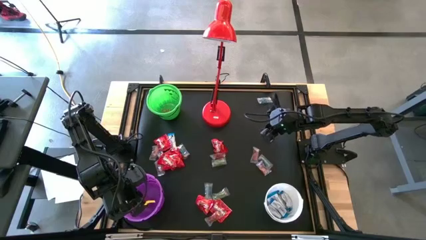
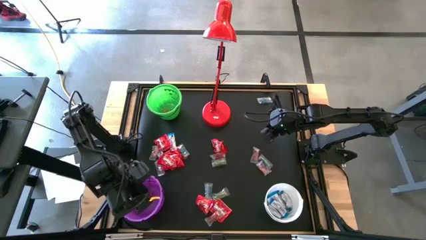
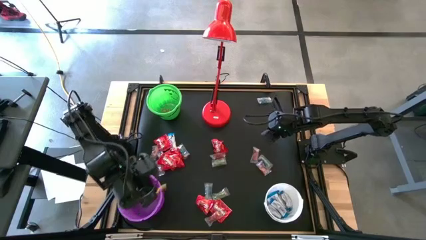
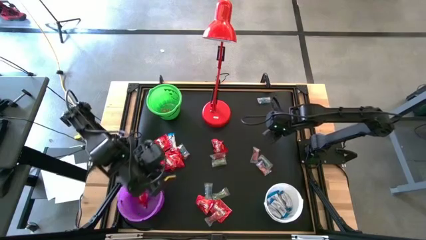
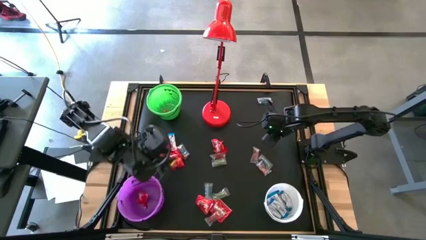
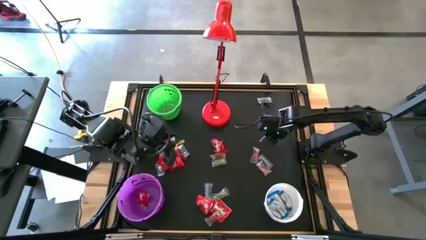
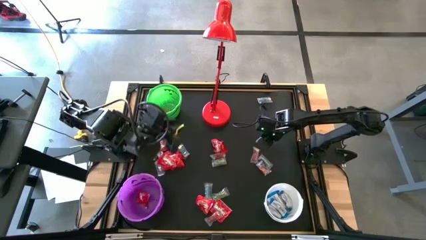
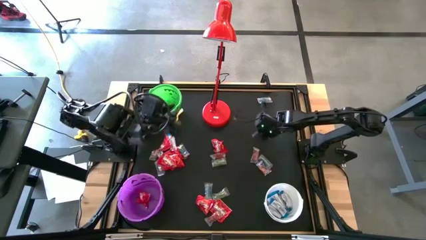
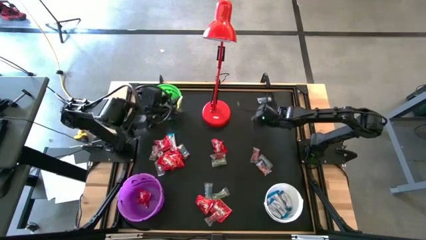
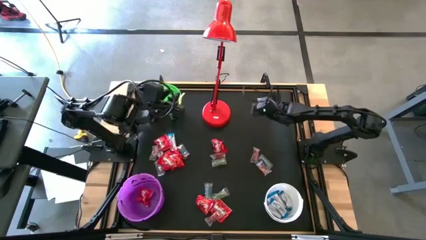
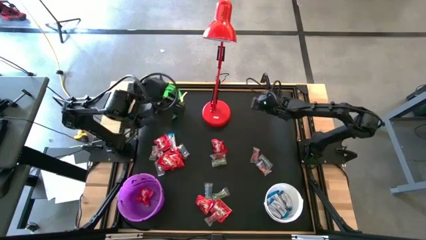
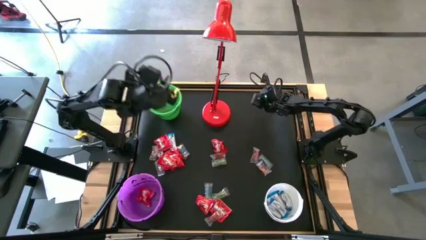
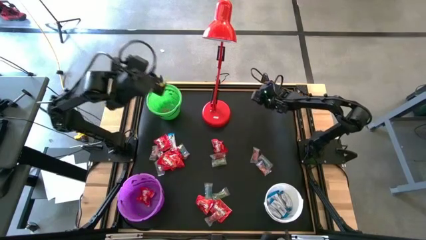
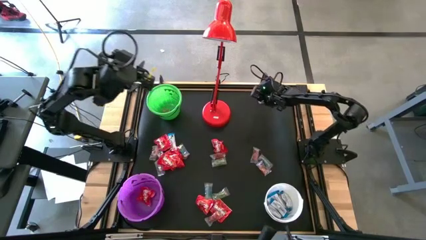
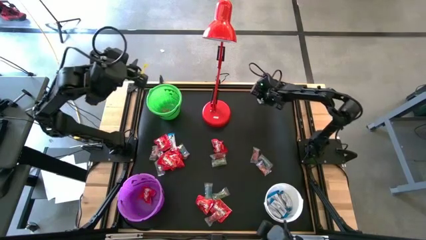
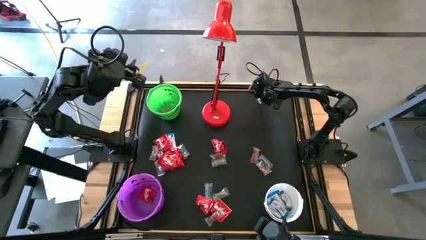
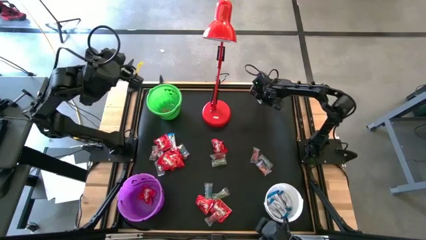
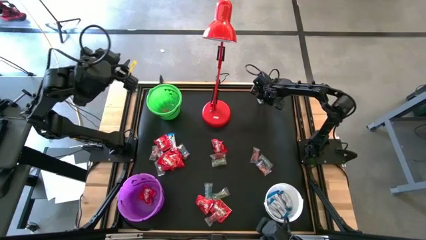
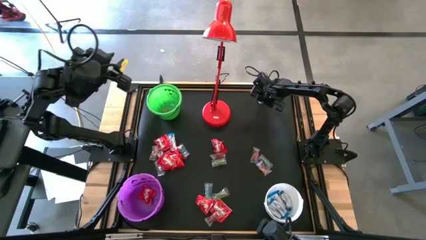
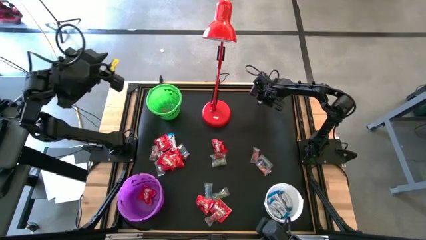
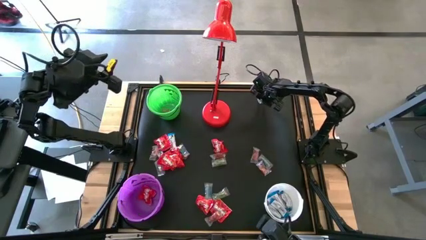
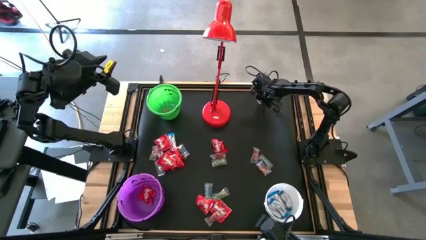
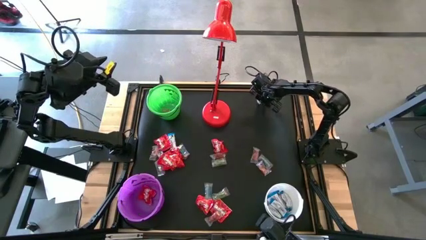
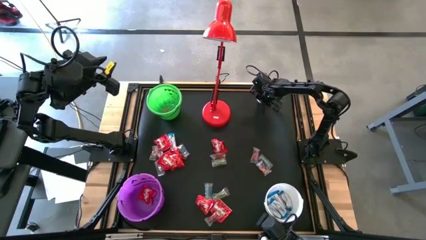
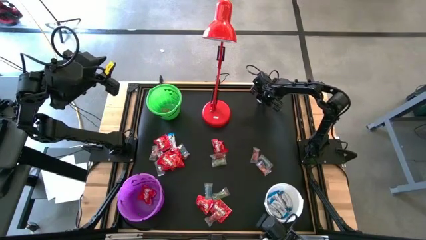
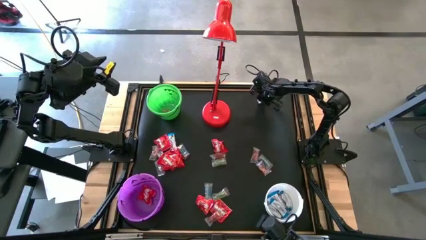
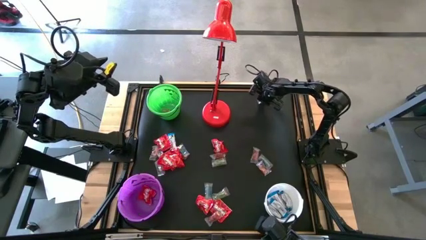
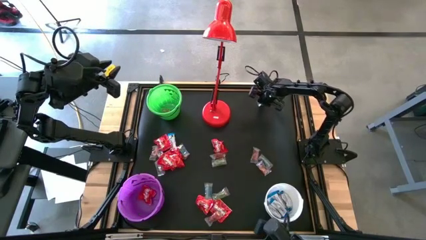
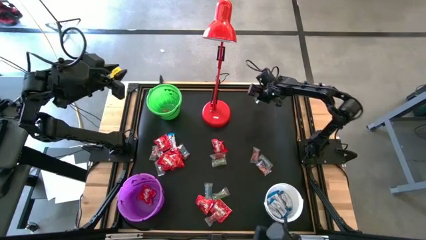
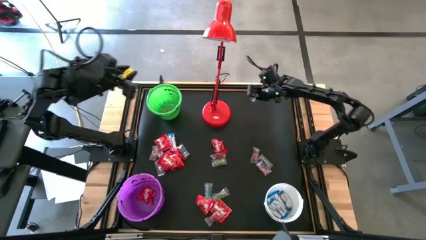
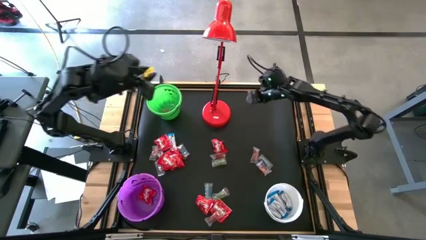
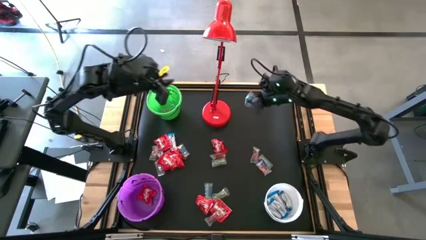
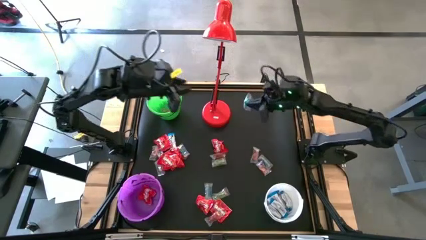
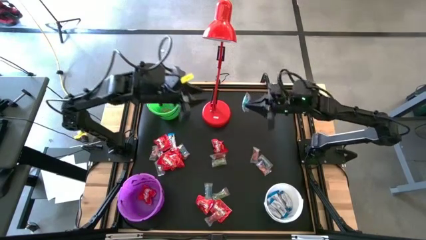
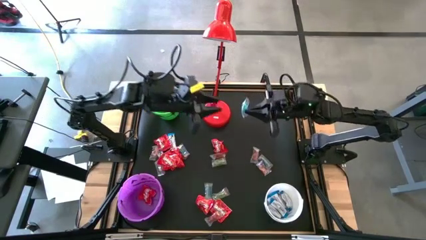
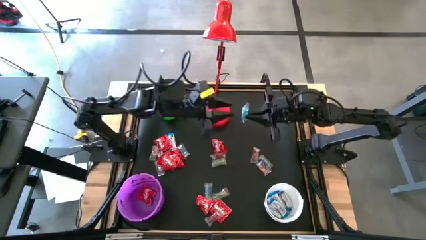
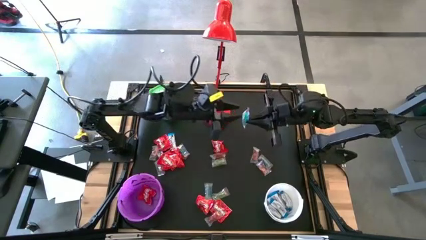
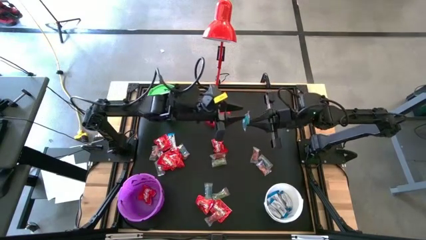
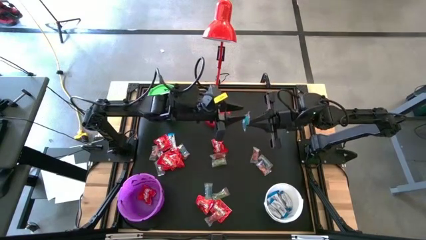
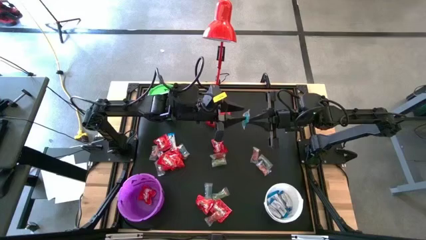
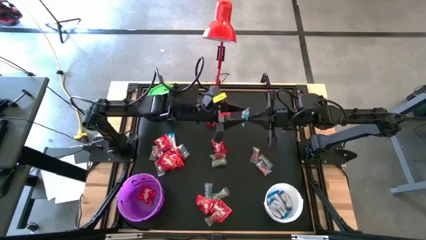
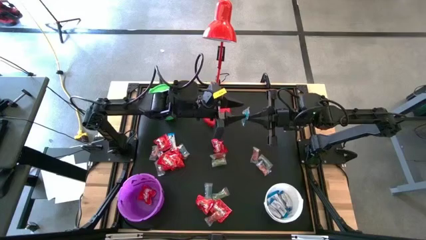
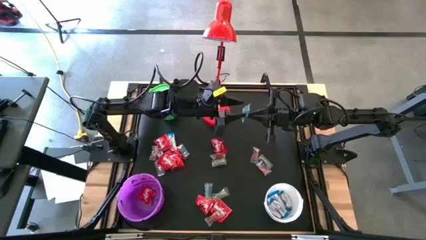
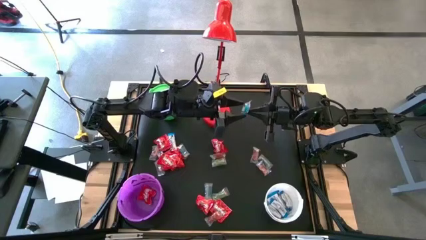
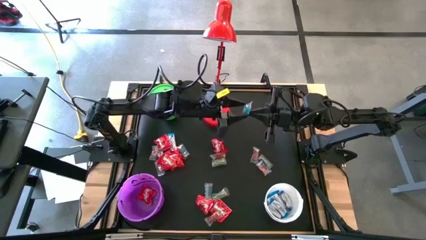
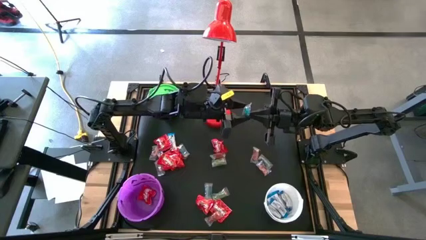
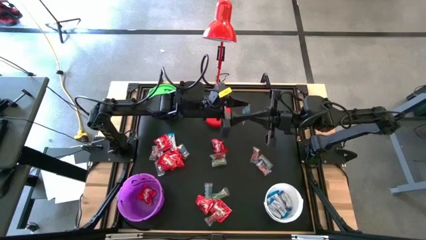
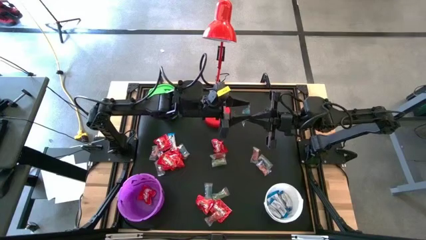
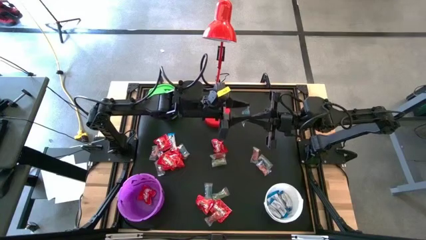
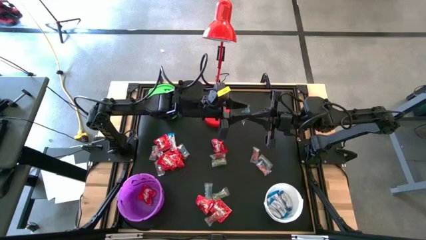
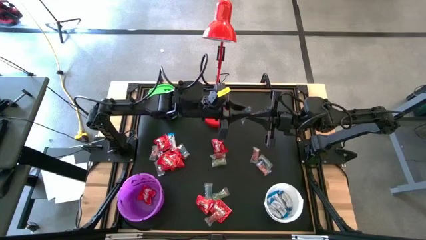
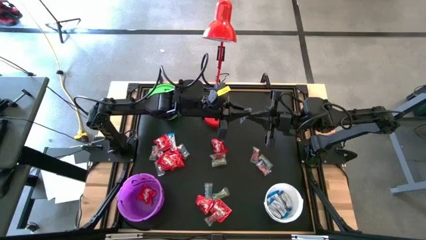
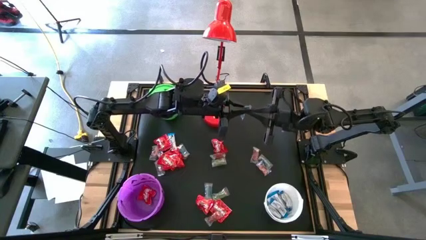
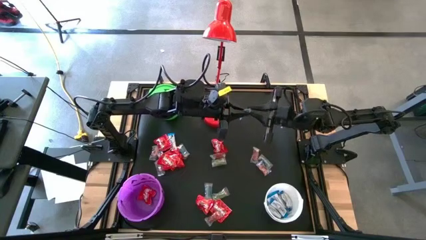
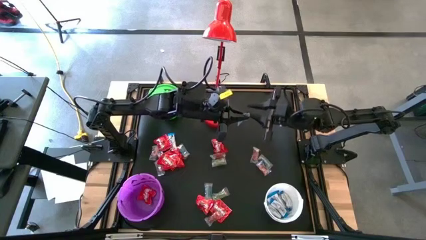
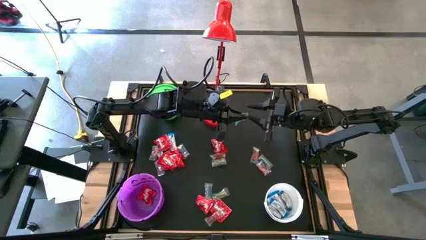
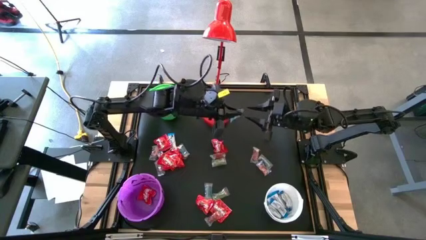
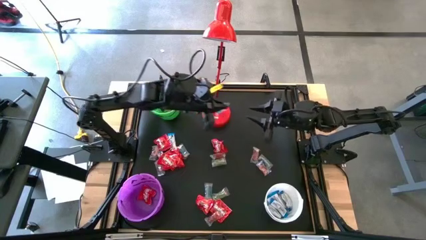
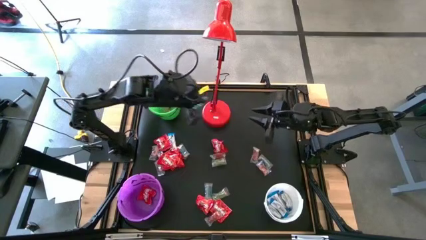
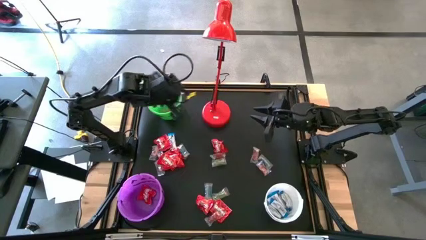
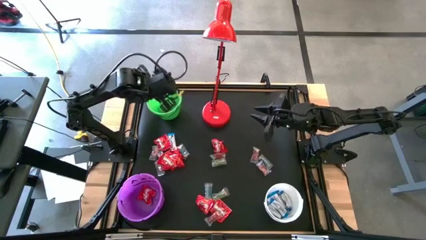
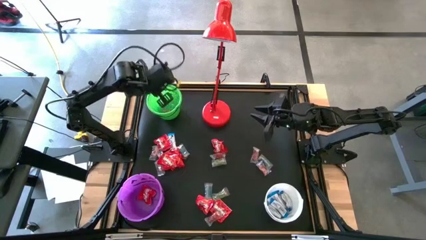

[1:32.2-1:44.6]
Task: Sort candy
Put the blue gummy into the green bucket

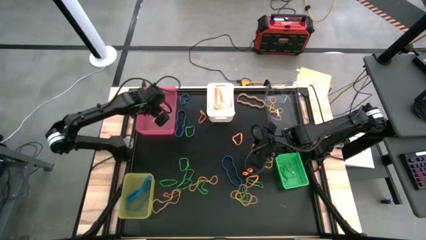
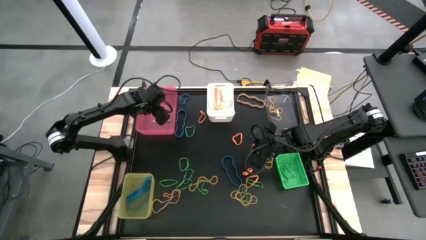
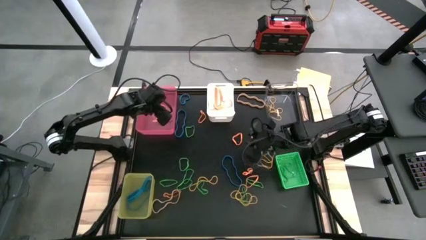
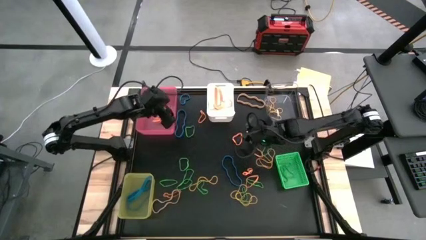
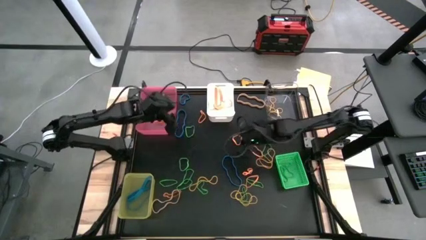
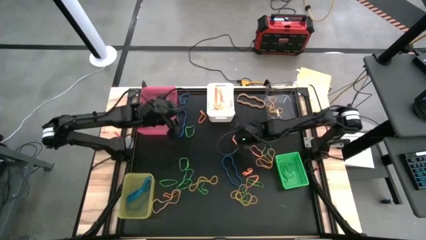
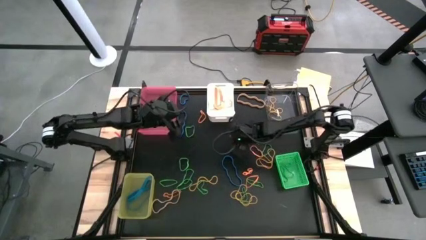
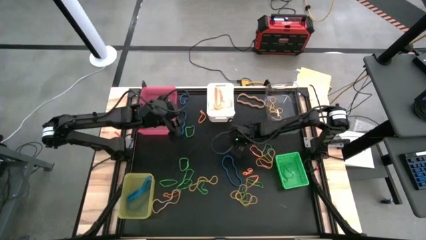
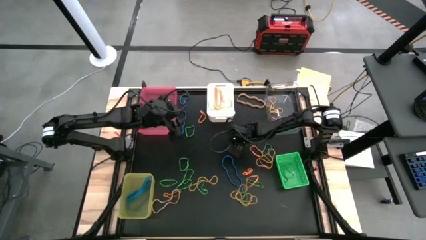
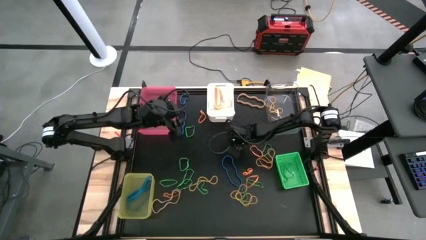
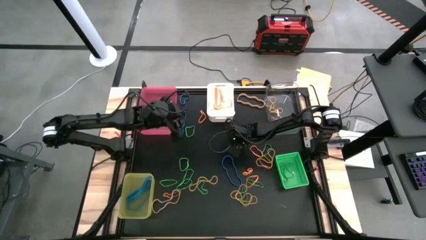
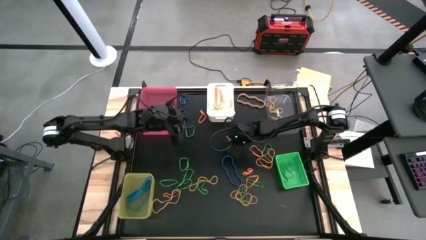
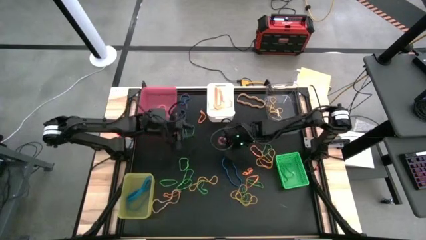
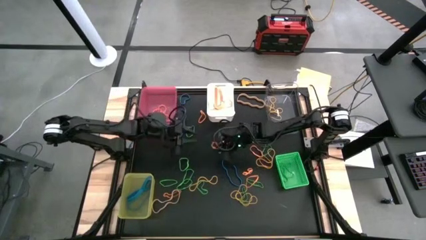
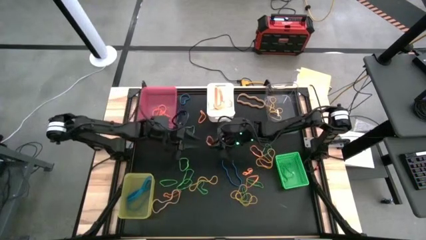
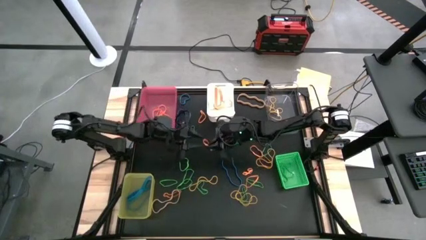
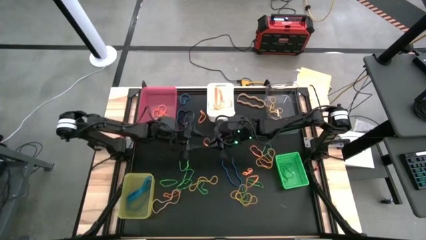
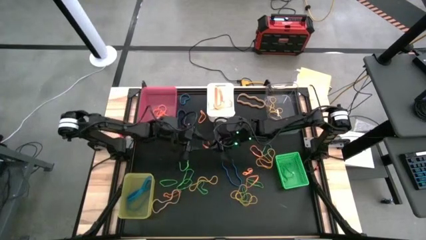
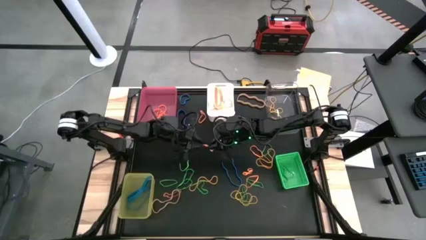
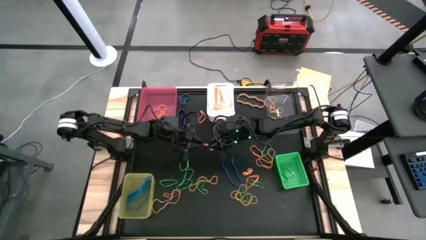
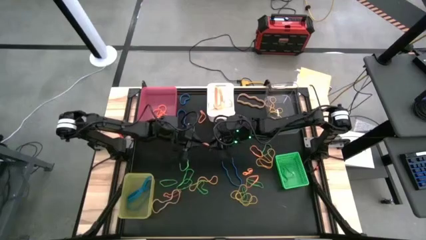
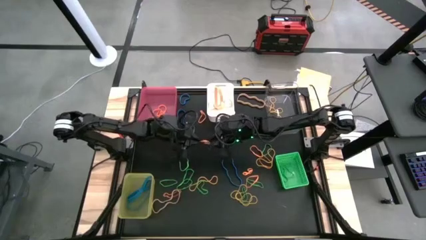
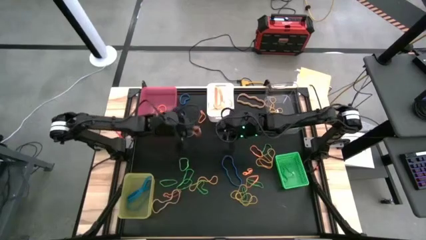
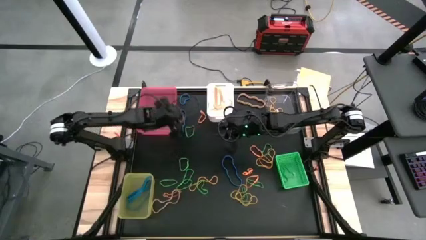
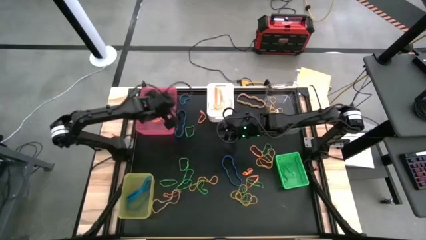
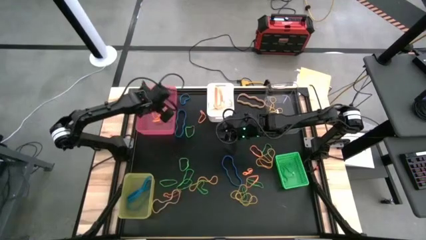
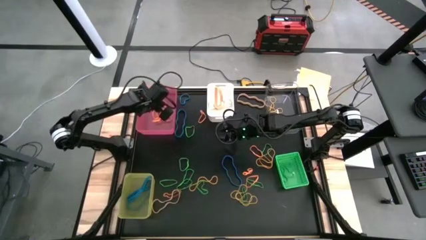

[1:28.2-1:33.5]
Task: Sort rubber bands into baskets
Put the orange rubber band into the pink bin
